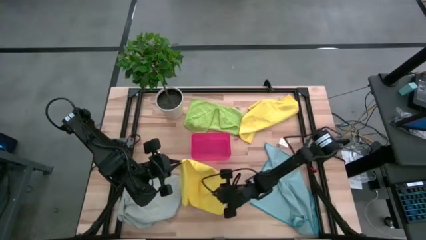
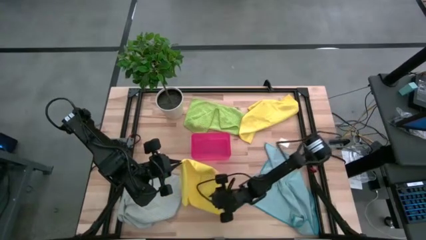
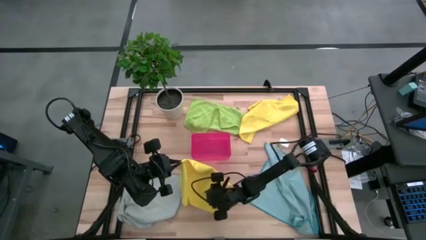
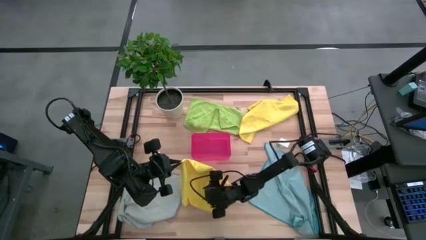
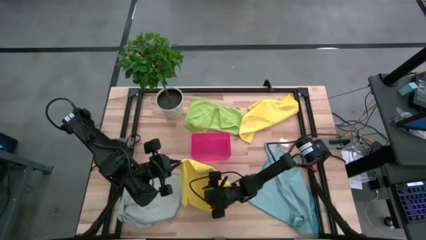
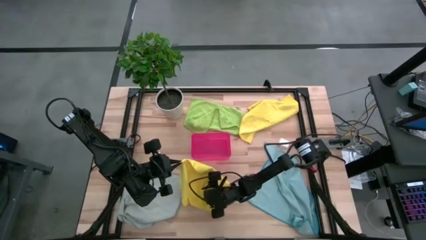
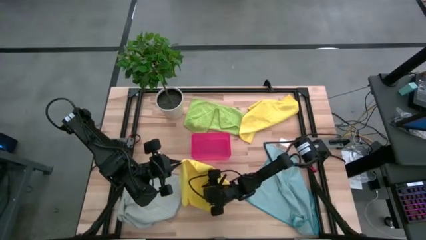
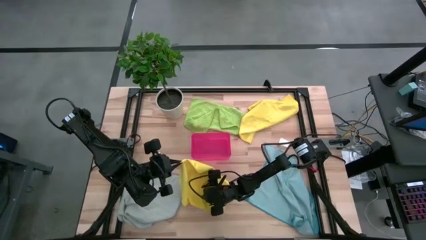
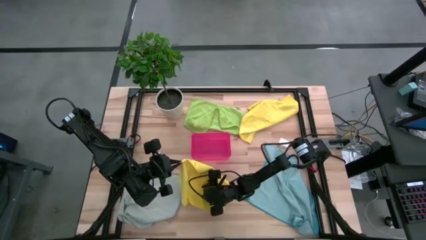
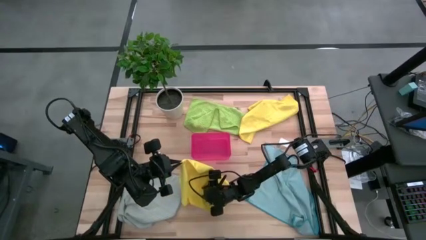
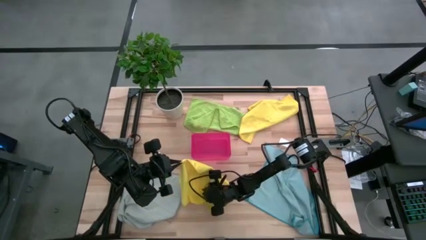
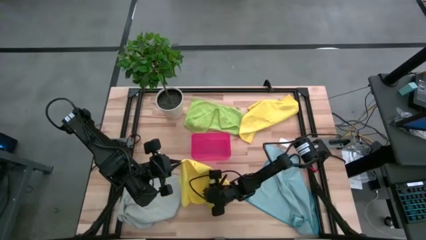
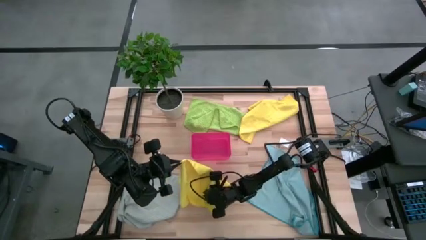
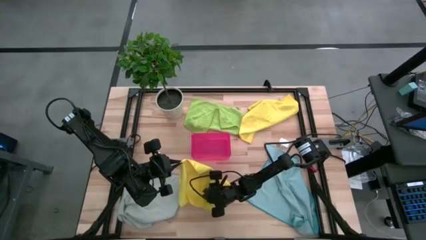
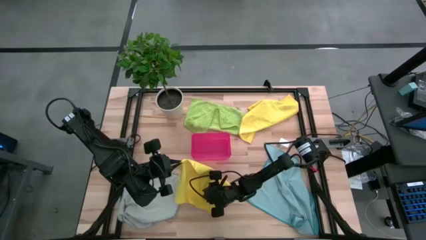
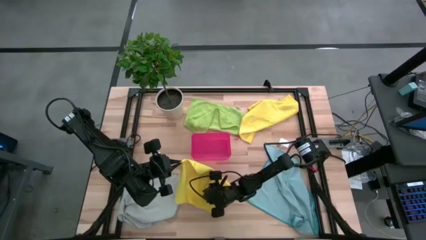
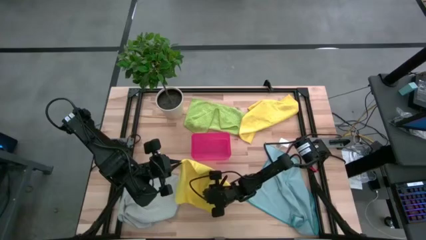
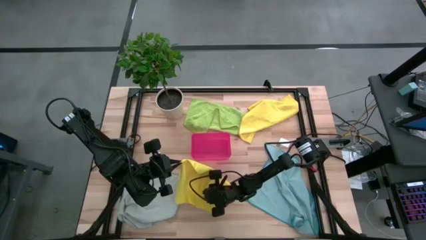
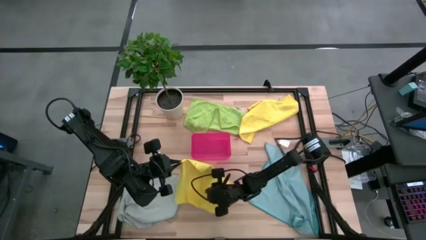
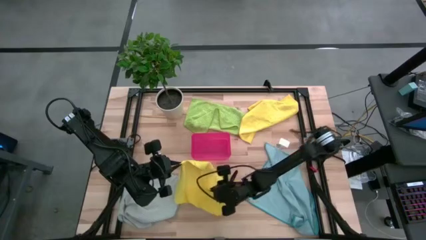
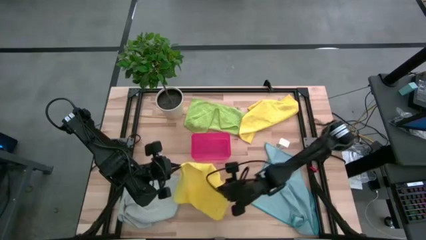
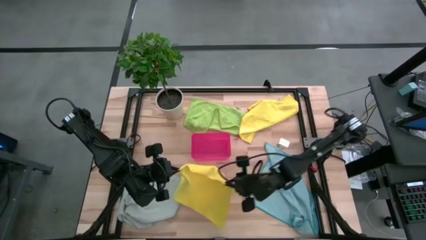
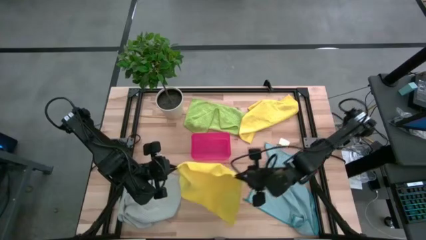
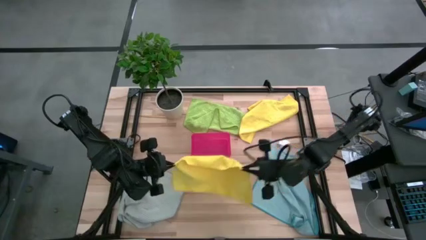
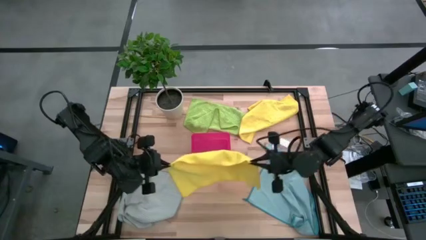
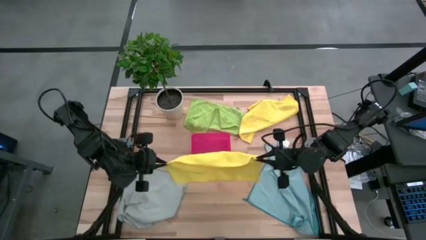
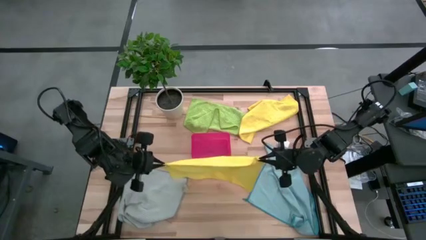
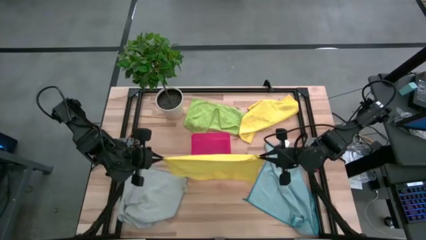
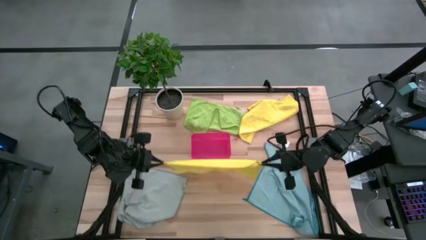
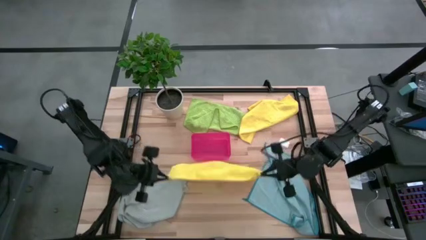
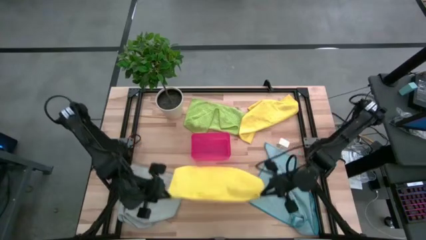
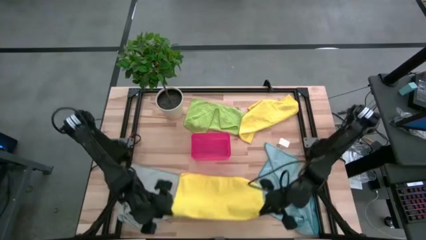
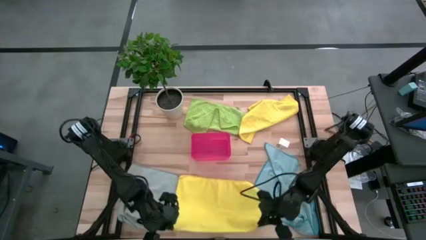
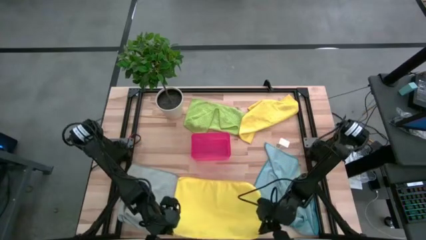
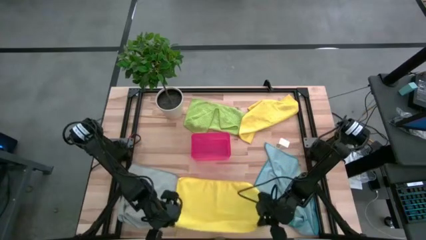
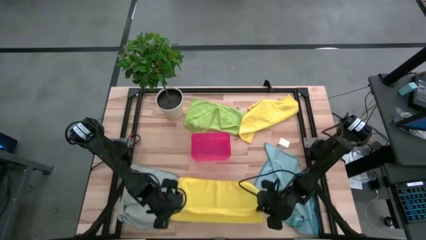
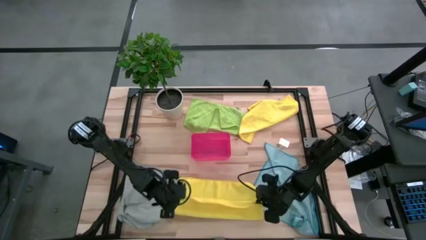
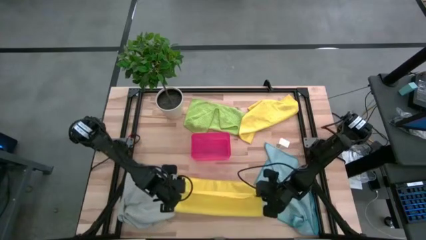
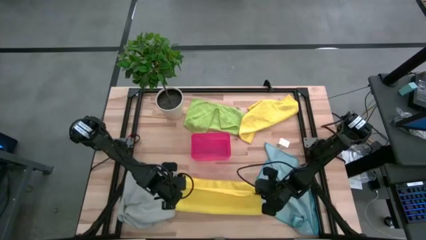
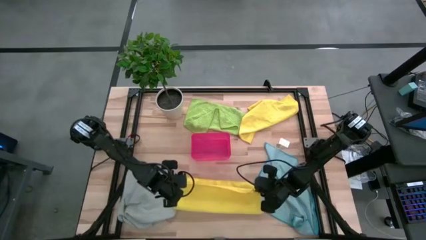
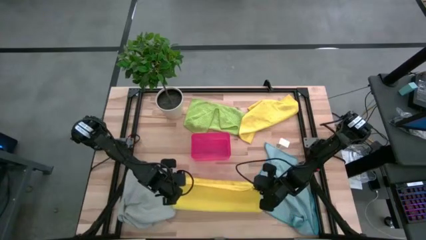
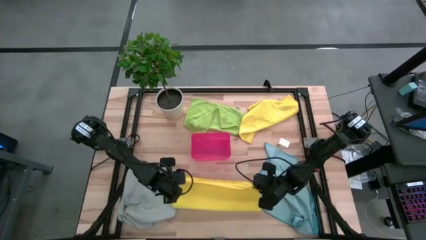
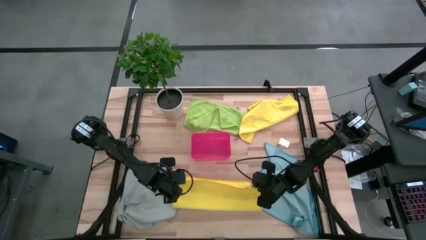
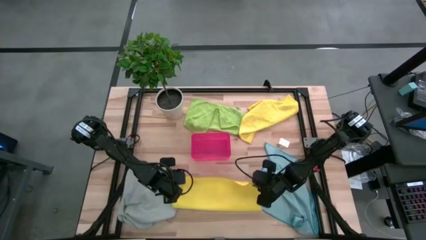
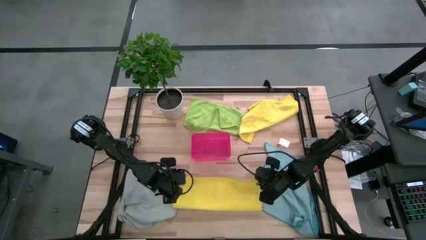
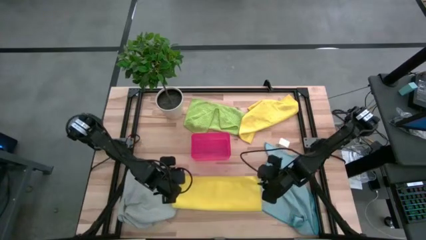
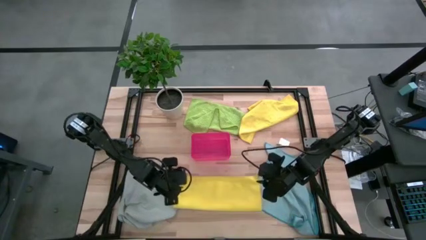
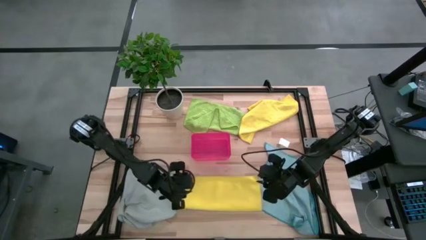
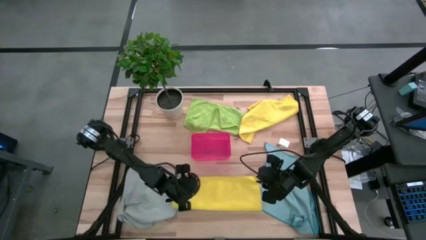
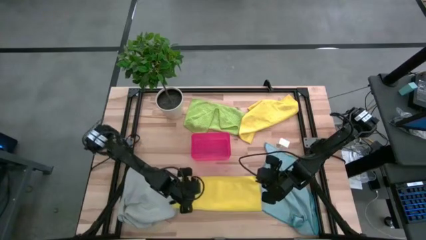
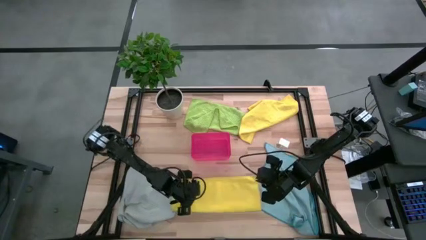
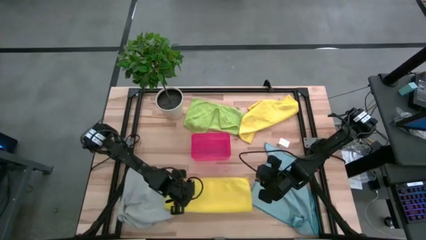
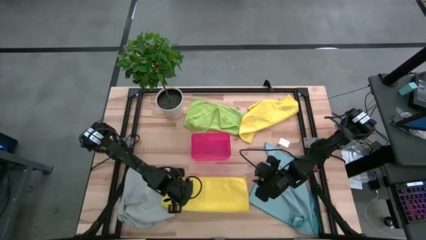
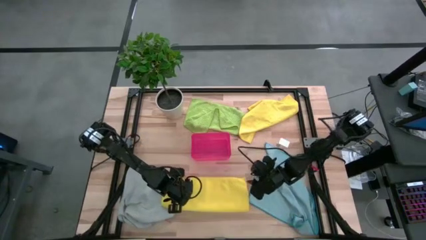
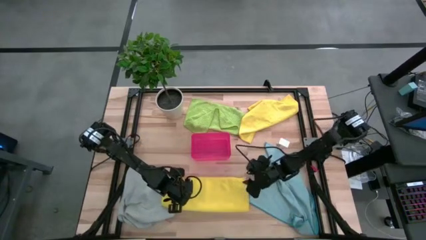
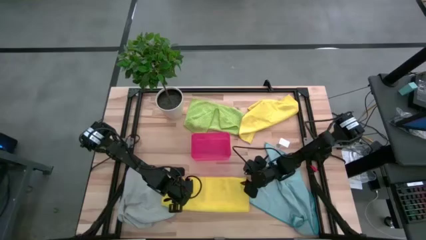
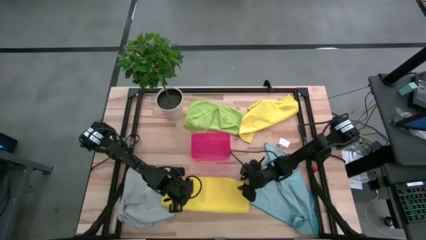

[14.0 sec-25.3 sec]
Task: Fold microfiber towels
Fold the bottom yellow microfiber cloth

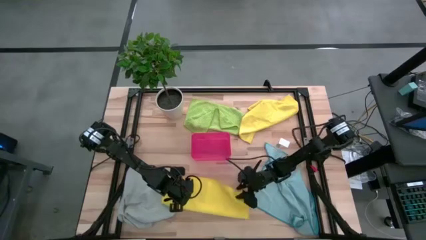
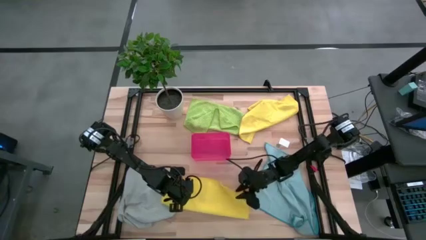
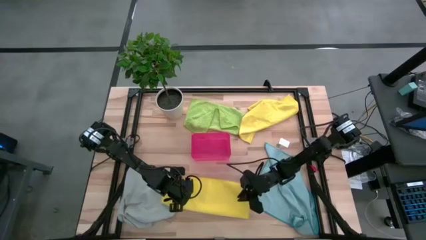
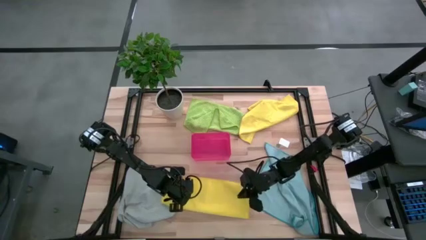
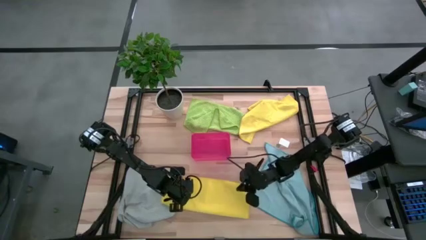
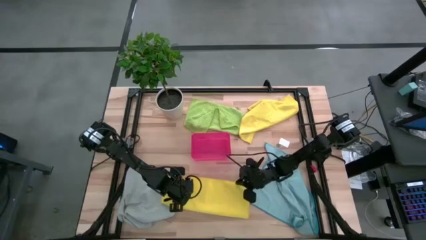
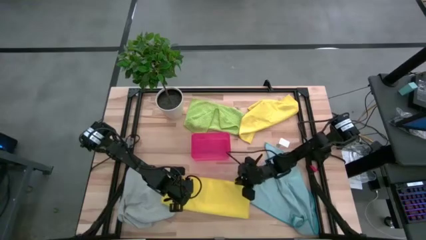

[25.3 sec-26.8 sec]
Fold the bottom yellow microfiber cloth
